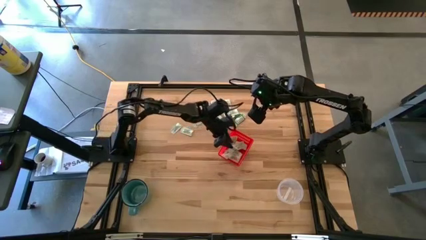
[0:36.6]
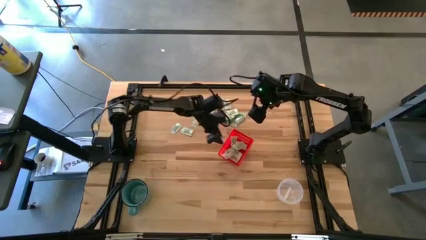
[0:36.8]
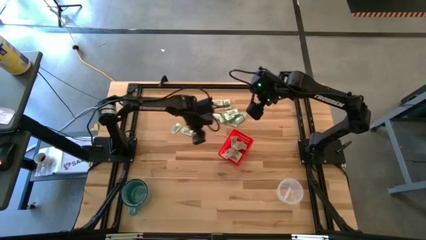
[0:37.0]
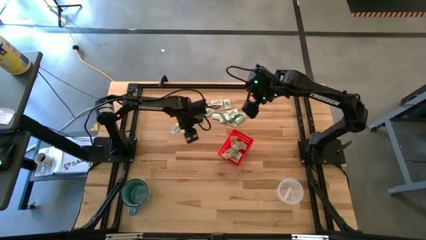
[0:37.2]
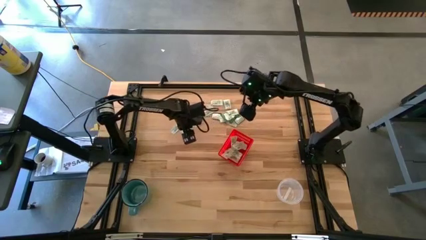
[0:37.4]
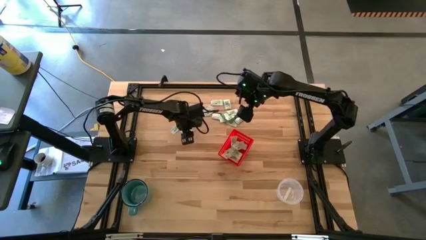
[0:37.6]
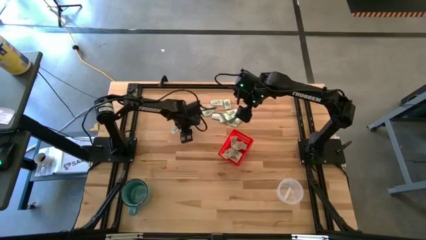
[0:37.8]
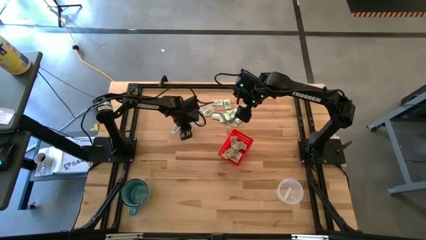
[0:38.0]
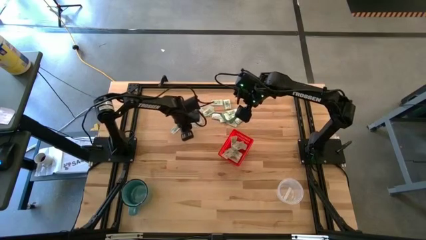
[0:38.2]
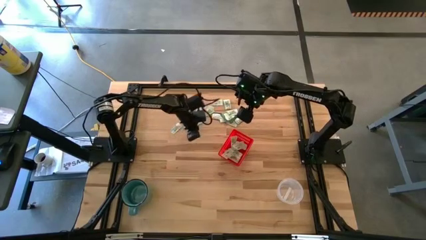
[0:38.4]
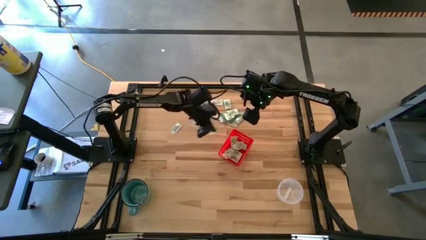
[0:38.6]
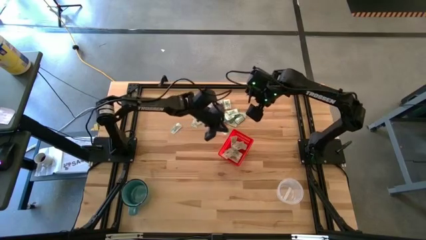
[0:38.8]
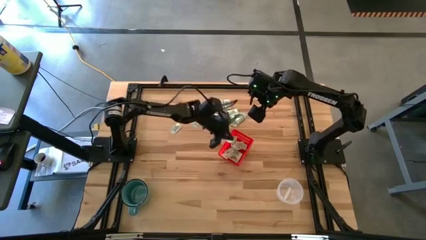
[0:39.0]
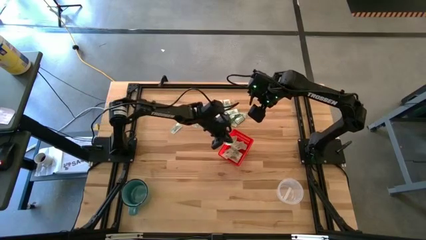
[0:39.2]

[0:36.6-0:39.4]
Task: Pick and place items into bin
Put the white stevia packet into the bin

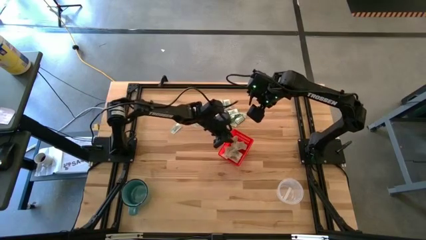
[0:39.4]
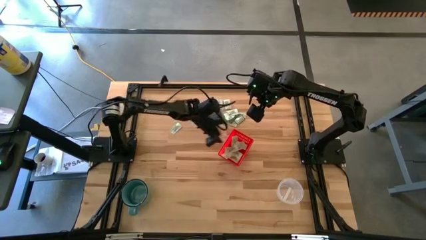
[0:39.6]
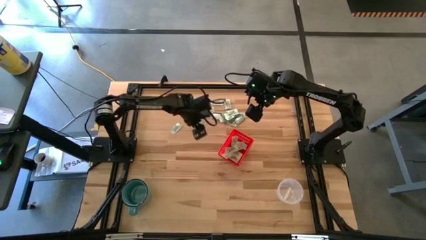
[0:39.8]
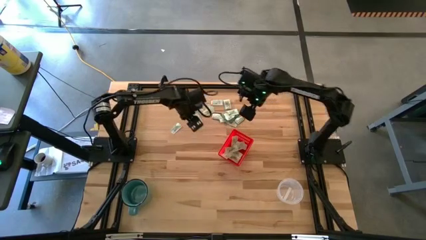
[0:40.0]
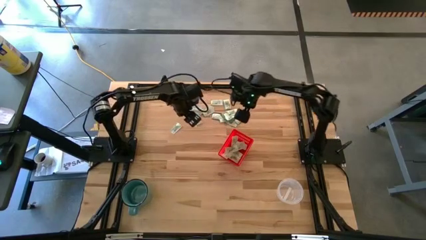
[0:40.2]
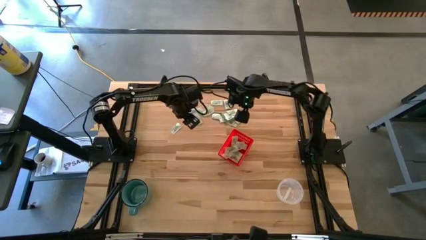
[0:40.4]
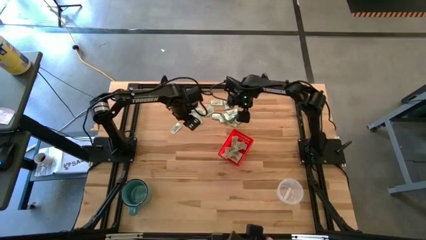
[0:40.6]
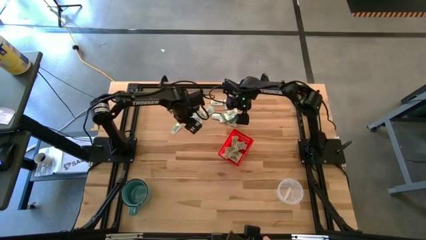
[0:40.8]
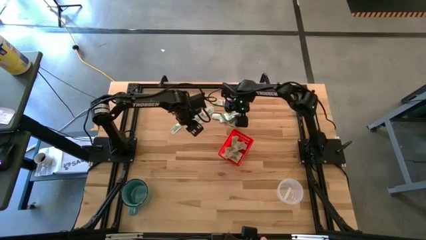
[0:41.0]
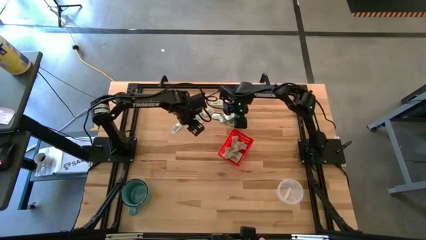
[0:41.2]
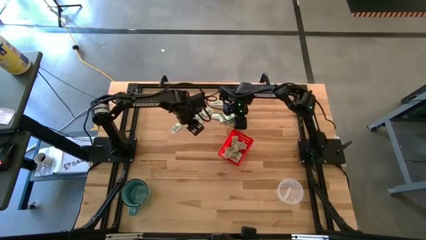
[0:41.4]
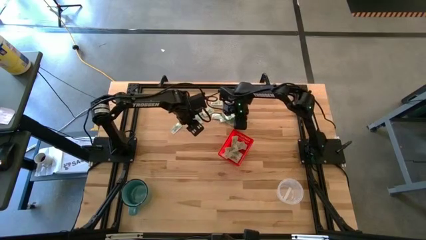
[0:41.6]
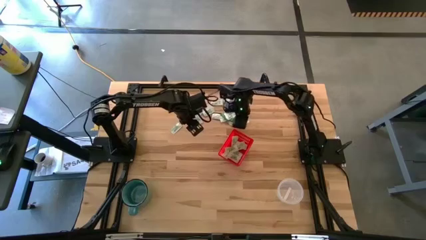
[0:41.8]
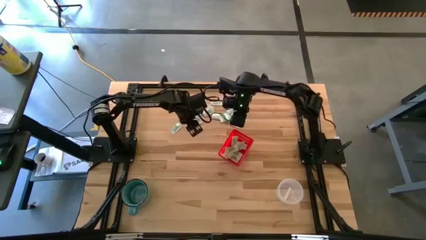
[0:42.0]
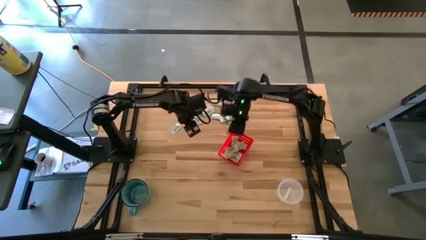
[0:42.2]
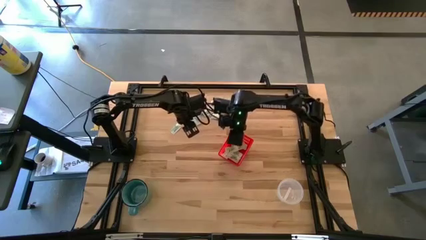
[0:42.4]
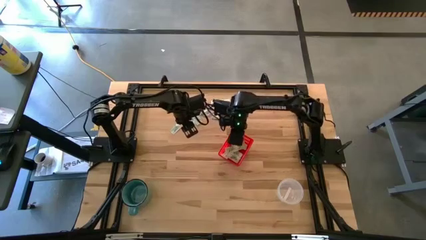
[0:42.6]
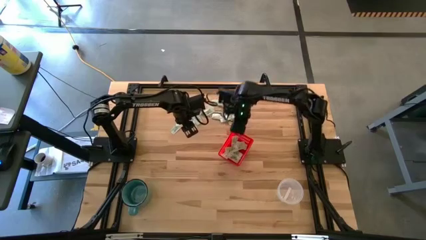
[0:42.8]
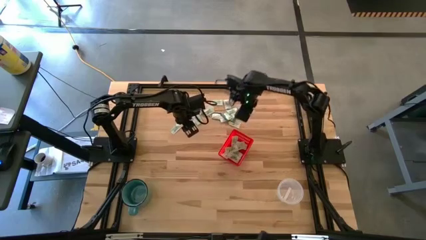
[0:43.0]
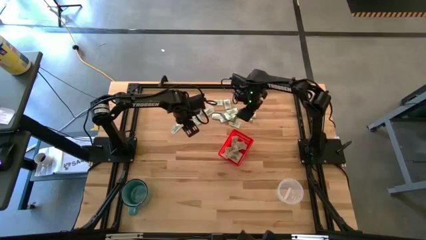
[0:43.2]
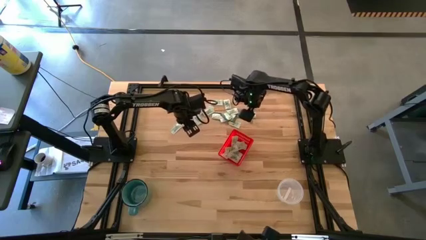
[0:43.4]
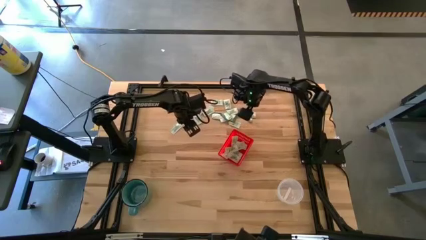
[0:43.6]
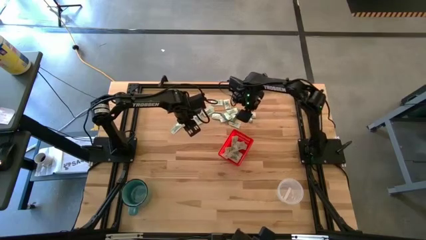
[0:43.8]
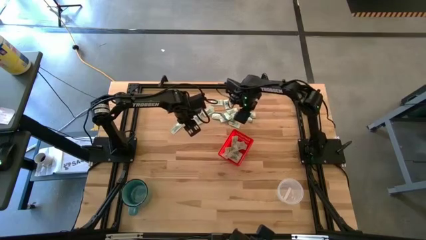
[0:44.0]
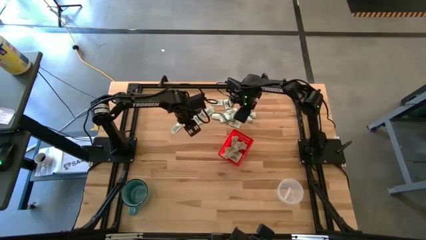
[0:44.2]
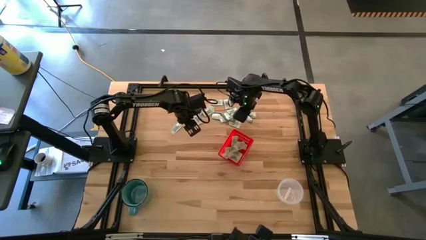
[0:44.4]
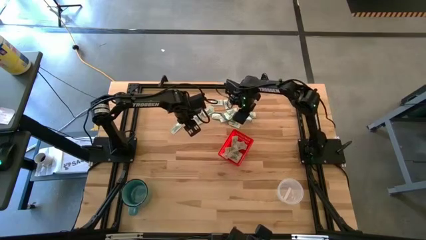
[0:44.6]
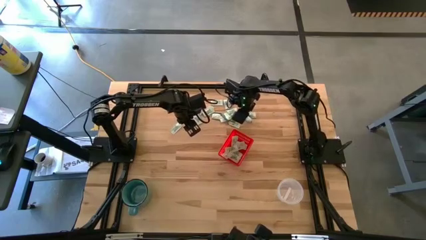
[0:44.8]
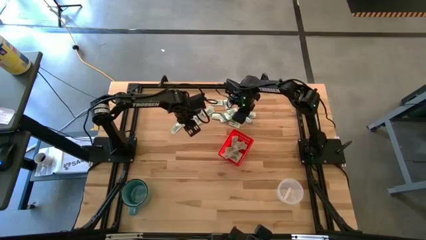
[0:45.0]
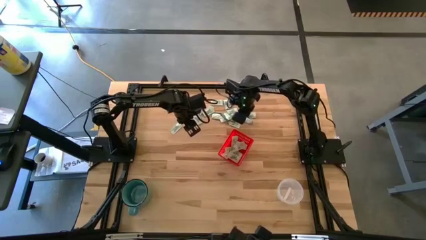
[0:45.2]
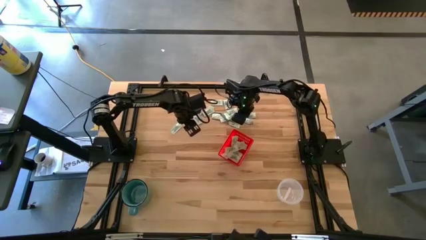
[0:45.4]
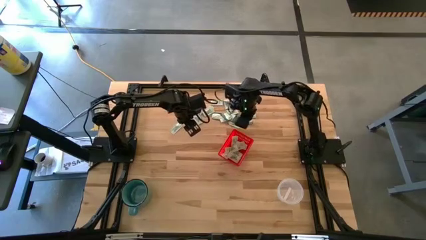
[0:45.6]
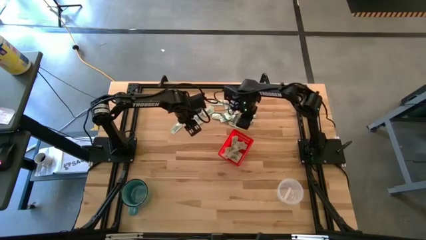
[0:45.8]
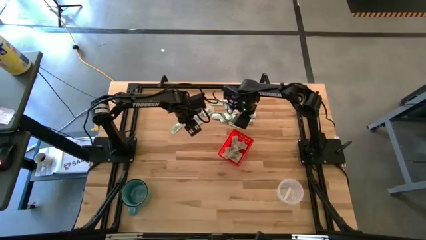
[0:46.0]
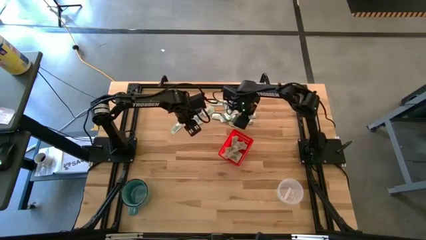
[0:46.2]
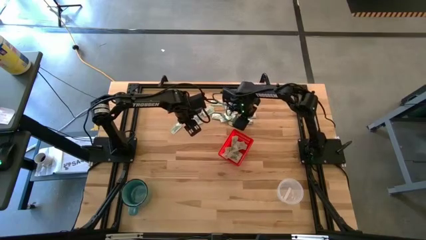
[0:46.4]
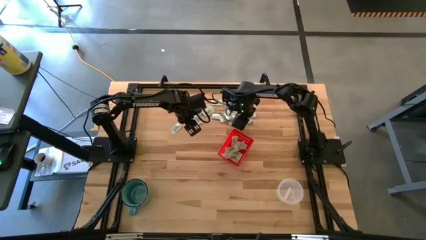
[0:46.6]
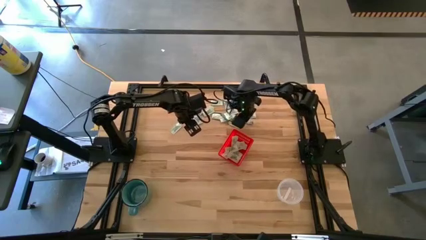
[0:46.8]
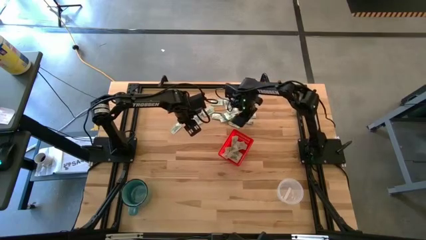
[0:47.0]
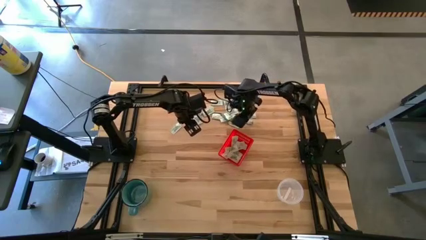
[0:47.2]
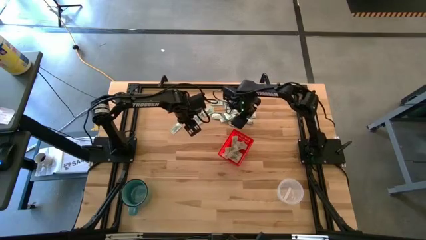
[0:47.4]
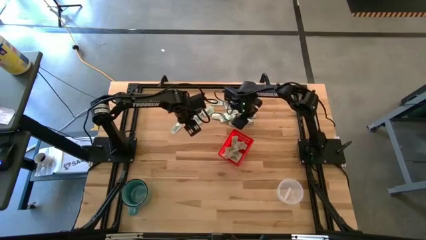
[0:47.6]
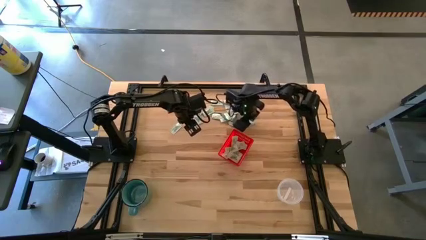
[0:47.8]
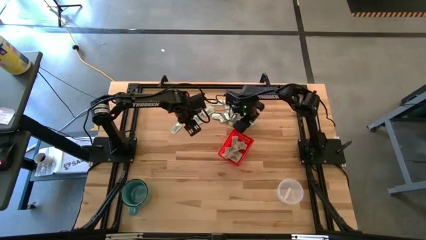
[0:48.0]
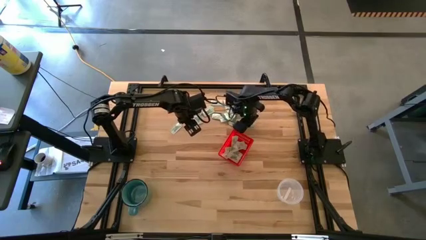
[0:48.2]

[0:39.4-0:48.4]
Put the green stevia packet into the bin

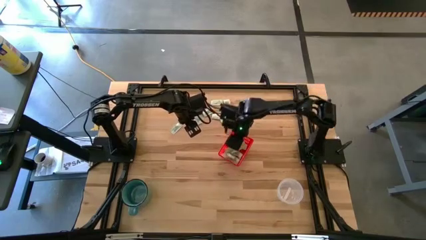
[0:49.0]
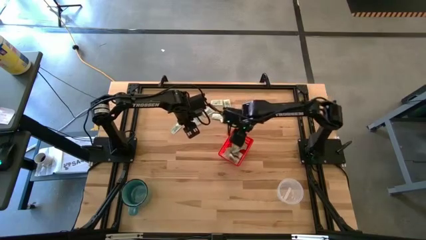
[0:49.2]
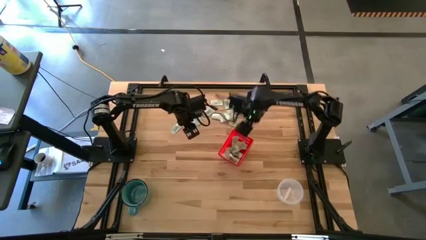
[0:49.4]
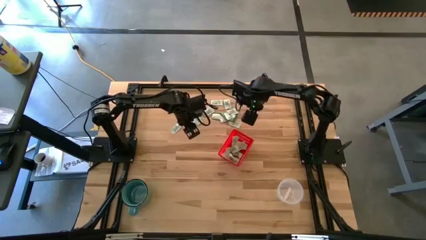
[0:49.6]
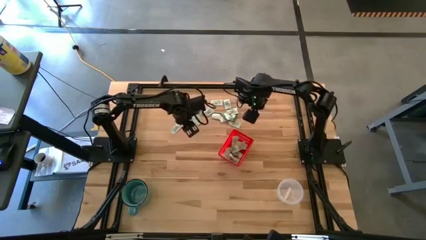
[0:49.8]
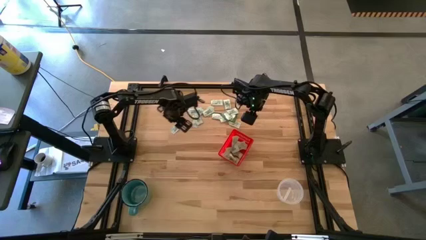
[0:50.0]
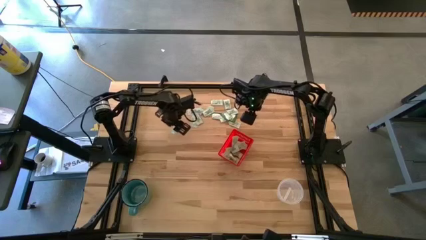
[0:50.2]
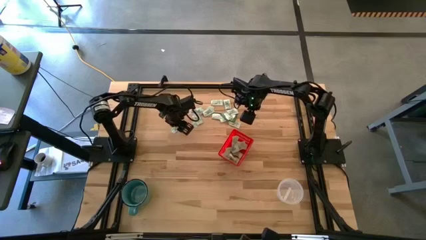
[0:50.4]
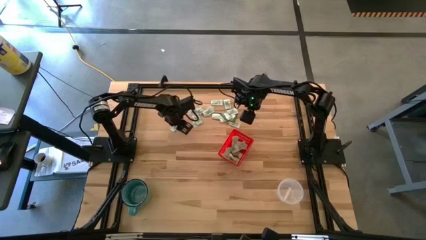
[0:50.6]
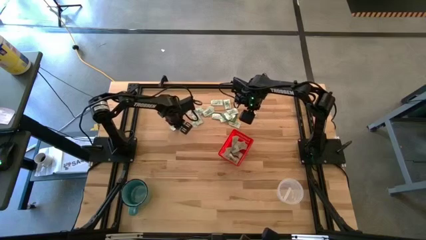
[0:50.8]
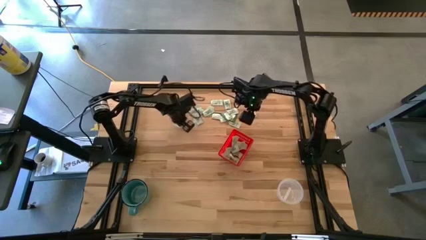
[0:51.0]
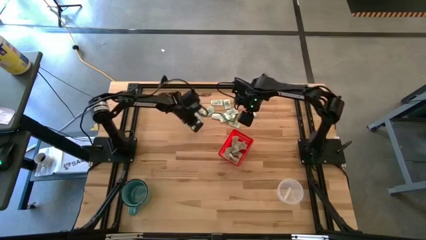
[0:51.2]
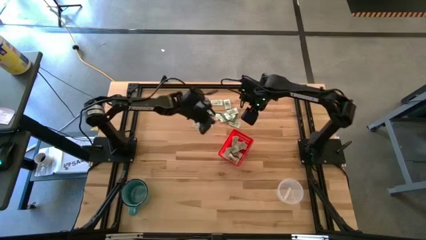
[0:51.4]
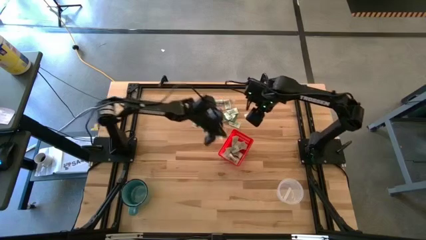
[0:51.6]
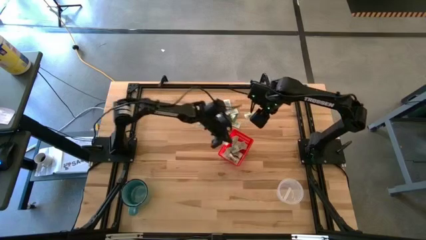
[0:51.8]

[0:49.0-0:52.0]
Put the white stevia packet into the bin

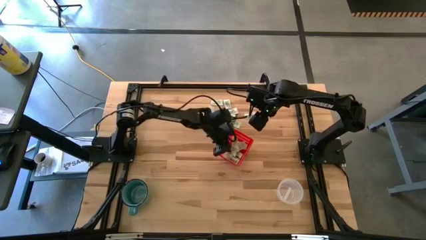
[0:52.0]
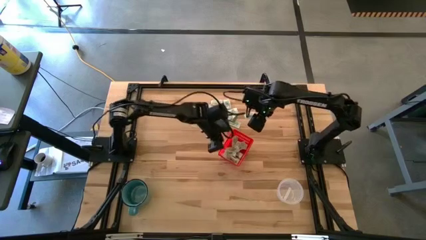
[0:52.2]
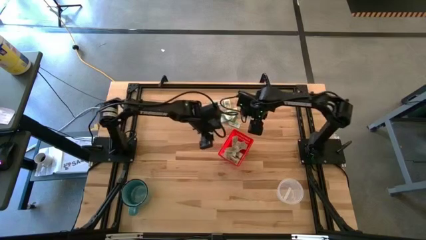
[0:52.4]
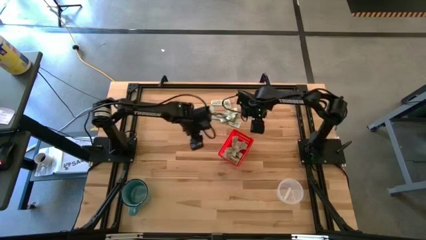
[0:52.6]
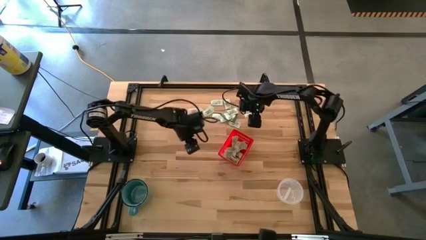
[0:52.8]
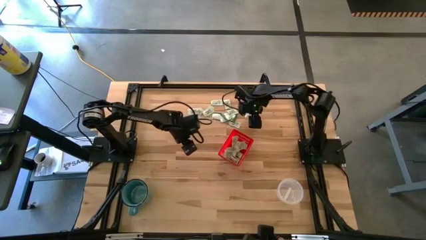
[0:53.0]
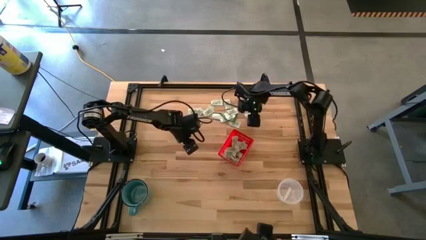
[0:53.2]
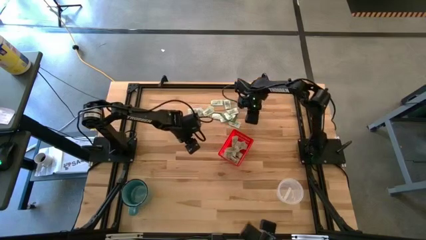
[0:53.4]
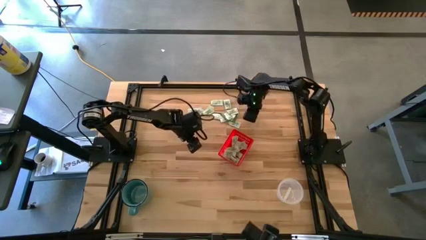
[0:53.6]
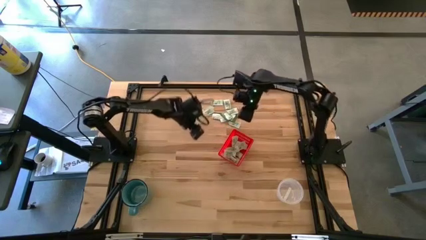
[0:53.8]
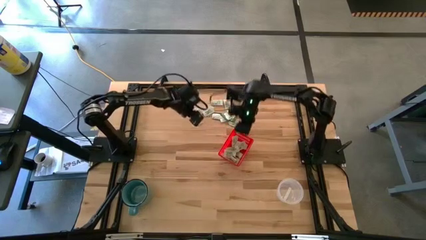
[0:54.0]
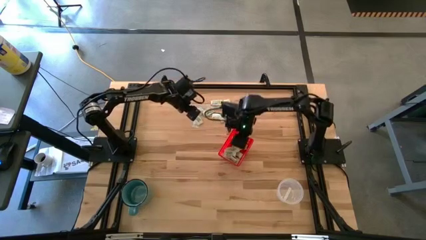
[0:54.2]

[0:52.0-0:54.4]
Put the white stevia packet into the bin

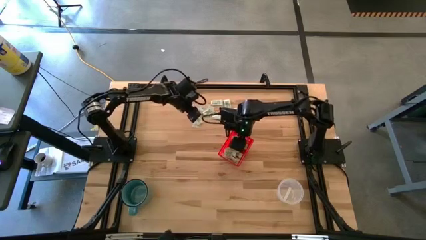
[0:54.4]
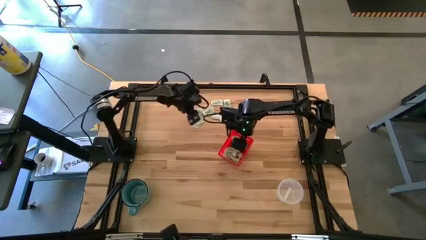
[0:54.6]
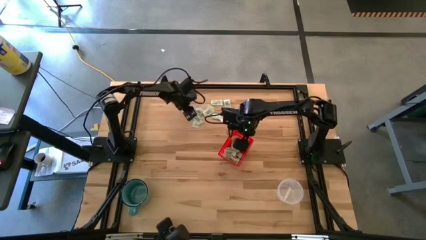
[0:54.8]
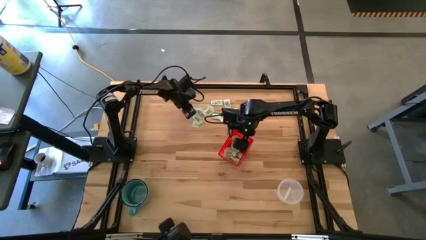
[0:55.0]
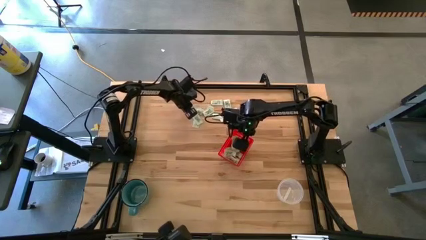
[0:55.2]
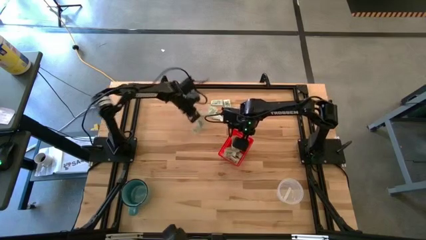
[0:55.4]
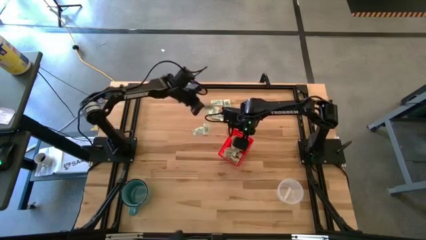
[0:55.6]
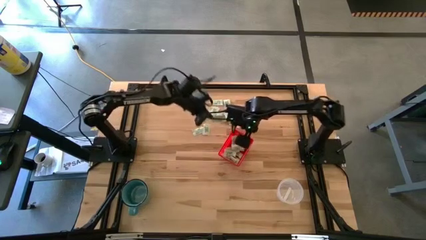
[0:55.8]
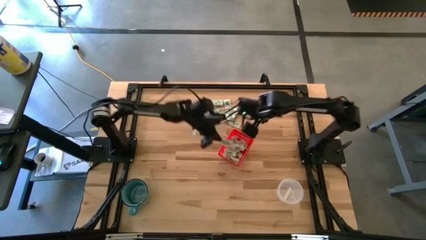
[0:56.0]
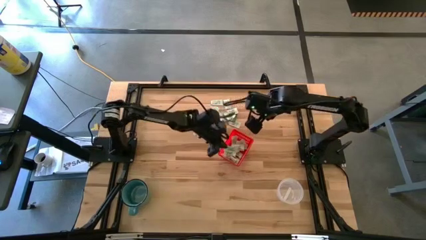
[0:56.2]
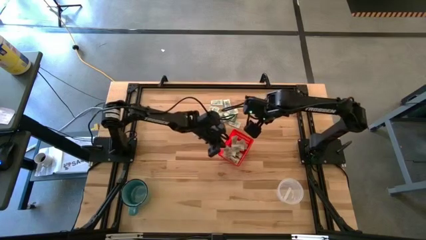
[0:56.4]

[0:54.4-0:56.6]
Put the white stevia packet into the bin
